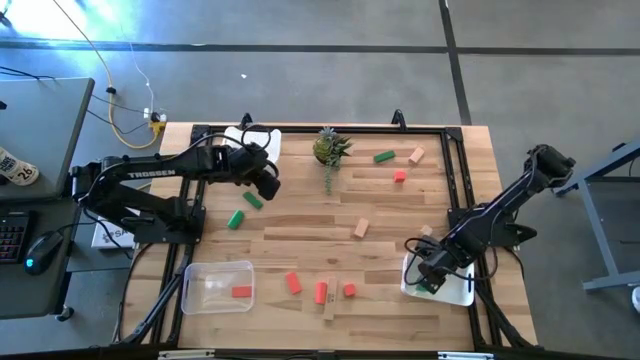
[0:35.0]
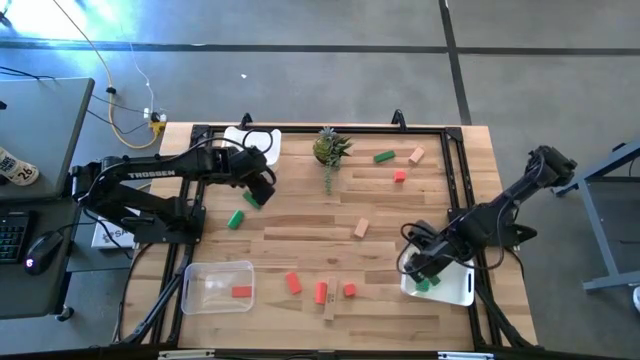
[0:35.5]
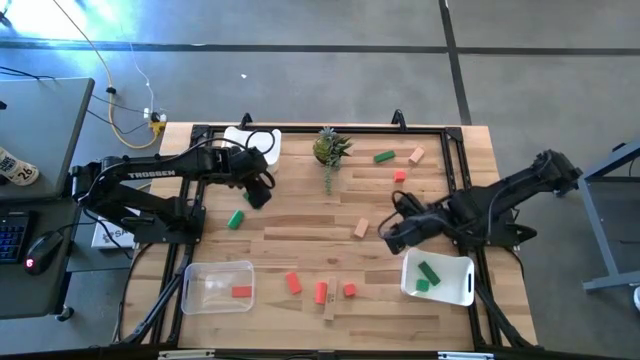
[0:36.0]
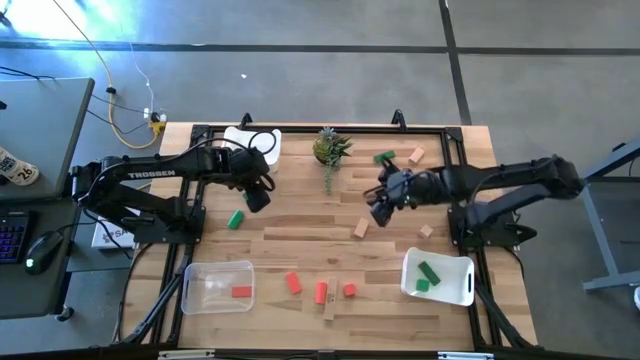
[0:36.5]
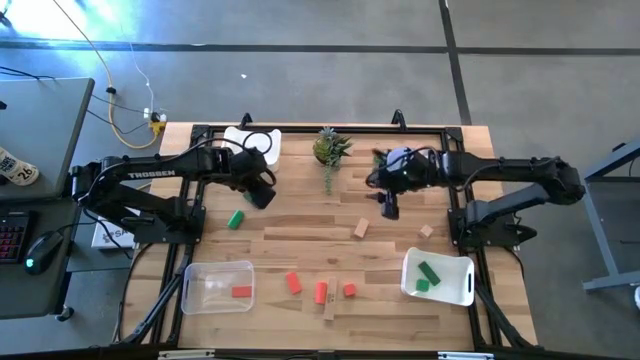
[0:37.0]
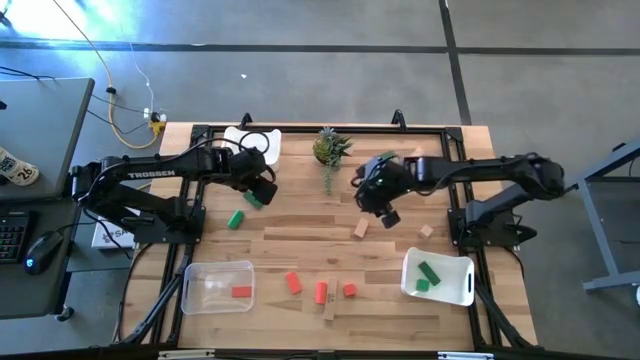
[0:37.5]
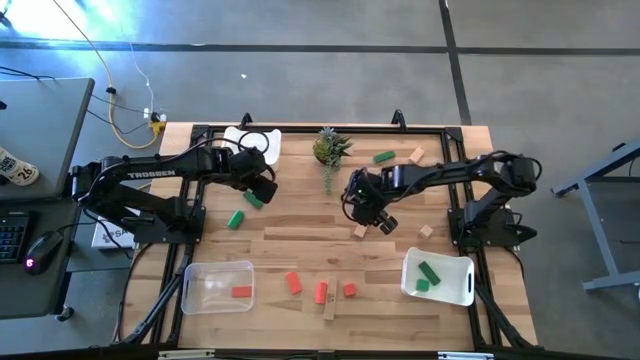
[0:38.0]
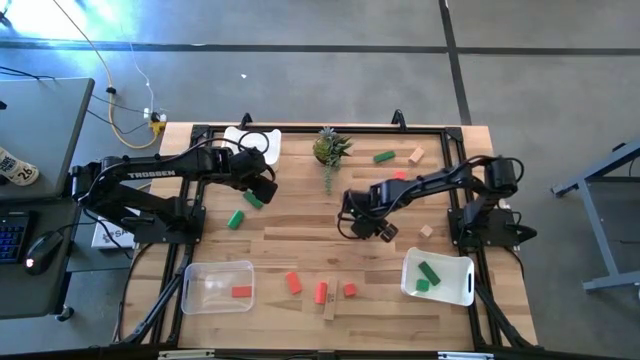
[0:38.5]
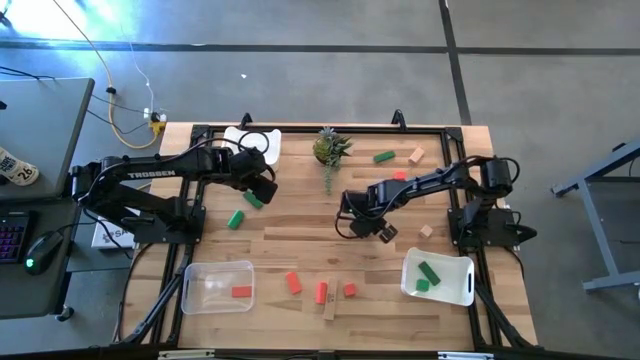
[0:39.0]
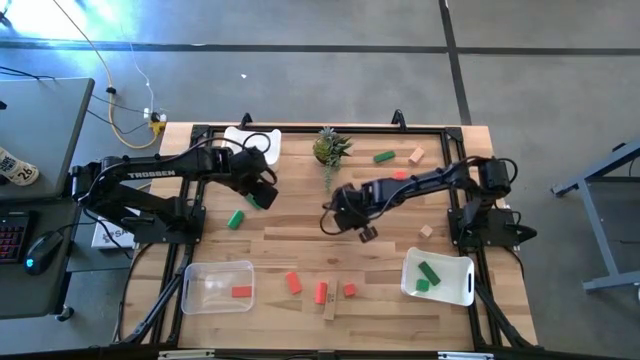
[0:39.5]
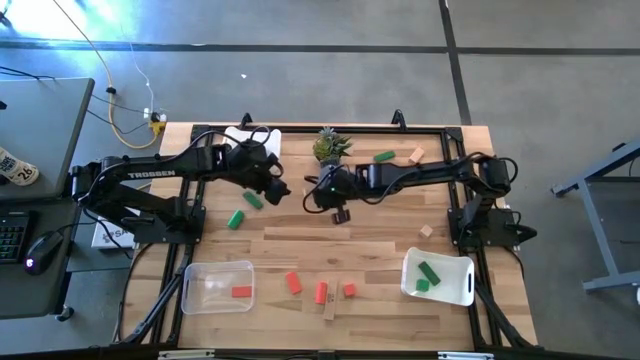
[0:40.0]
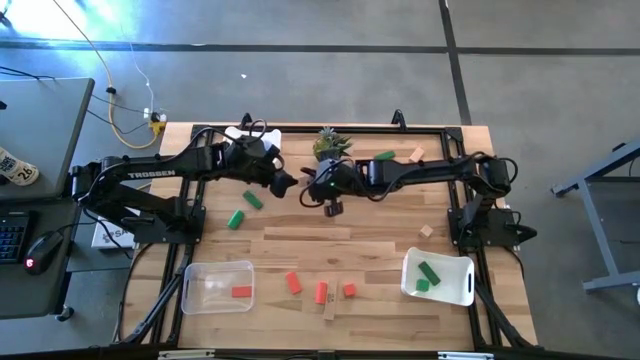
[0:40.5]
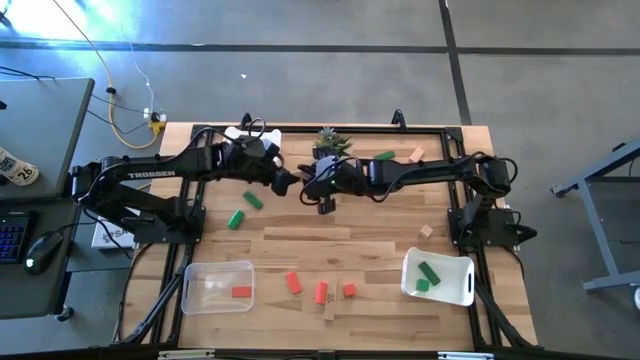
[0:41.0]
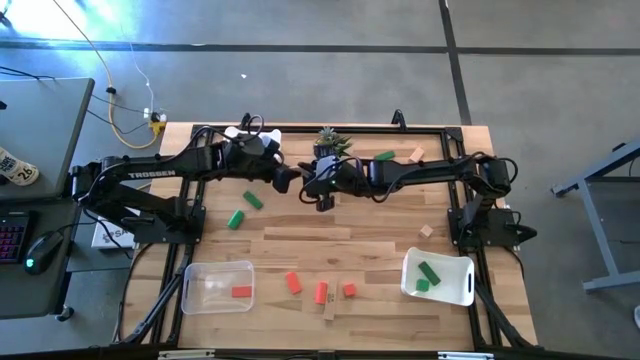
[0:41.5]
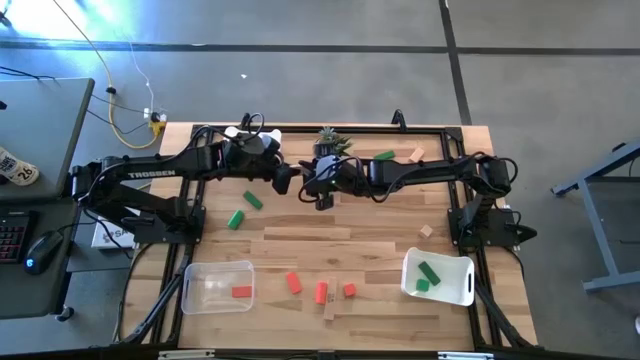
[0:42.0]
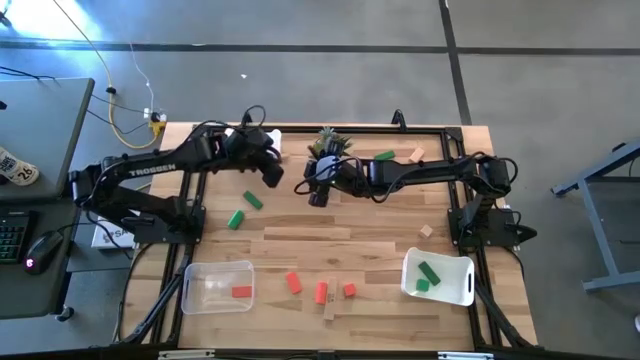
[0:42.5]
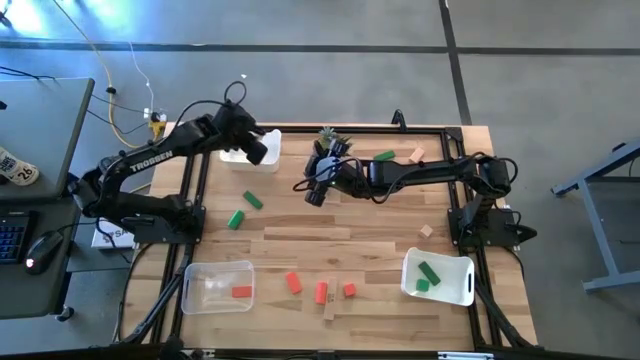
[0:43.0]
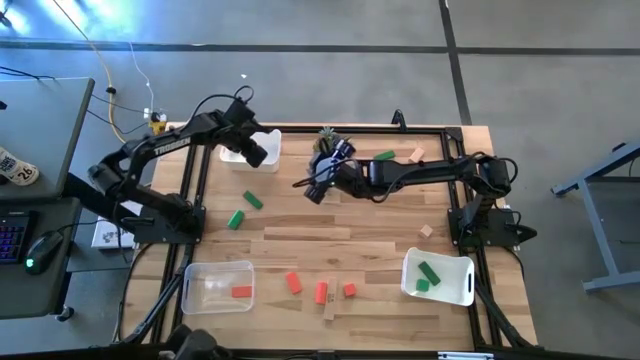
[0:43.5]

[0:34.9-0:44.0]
Task: Sort & place blocks by color
Put the brown block into the top white bin

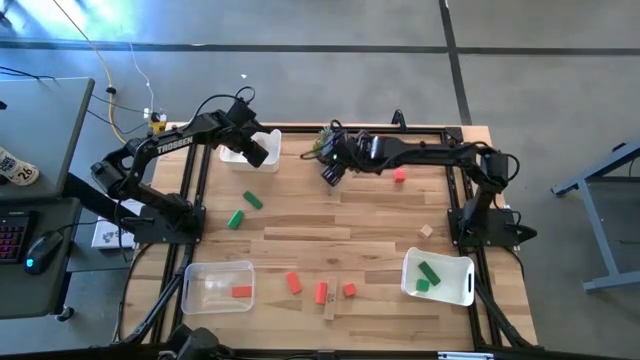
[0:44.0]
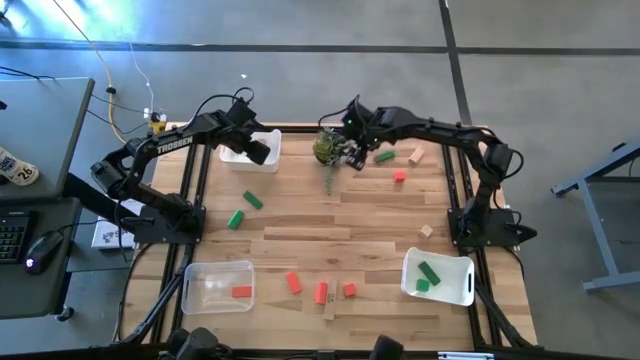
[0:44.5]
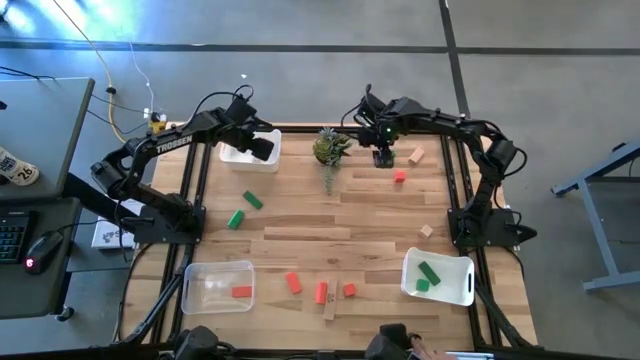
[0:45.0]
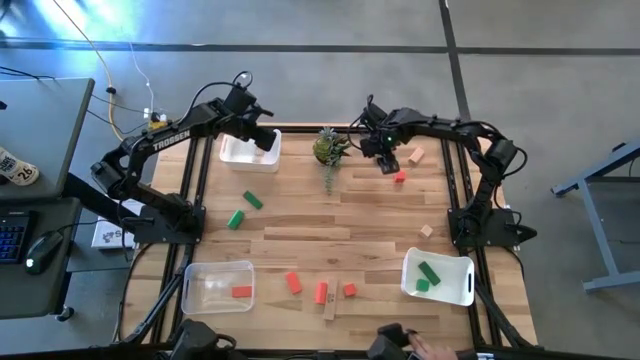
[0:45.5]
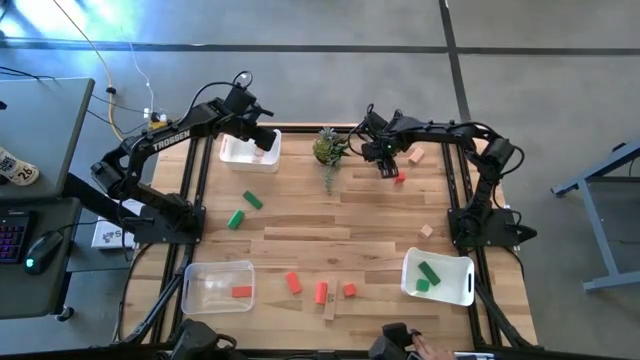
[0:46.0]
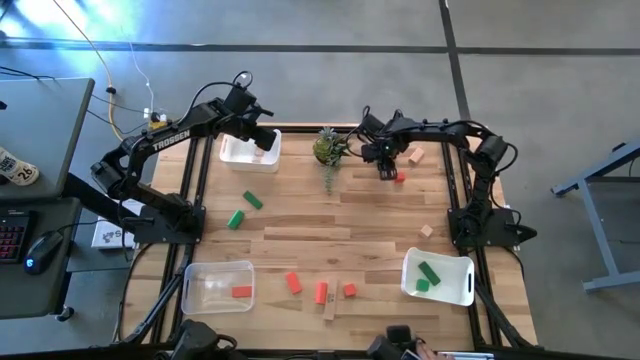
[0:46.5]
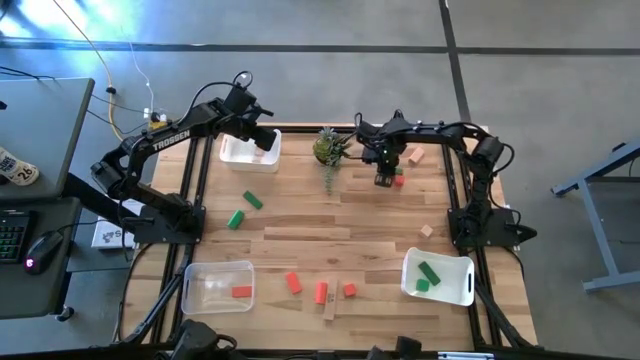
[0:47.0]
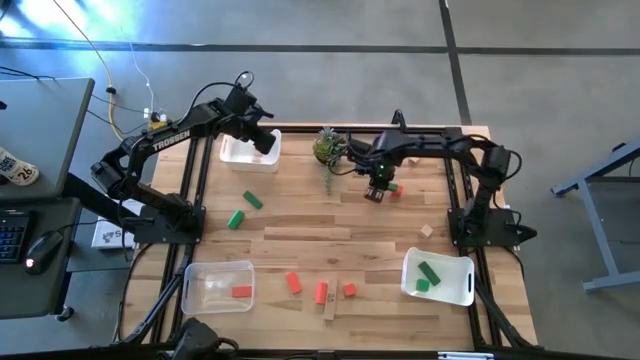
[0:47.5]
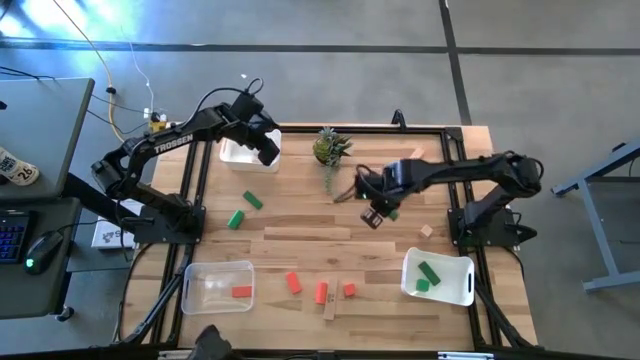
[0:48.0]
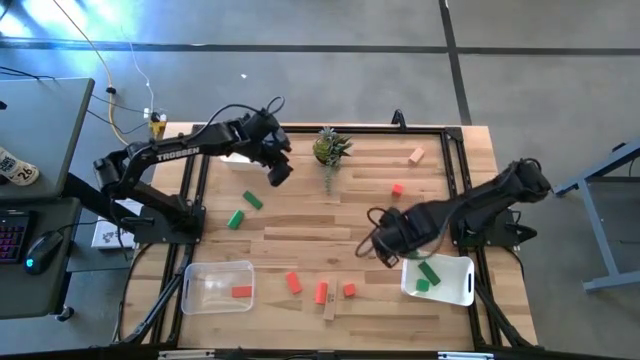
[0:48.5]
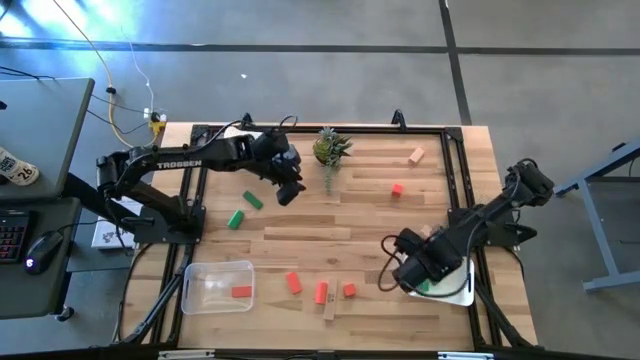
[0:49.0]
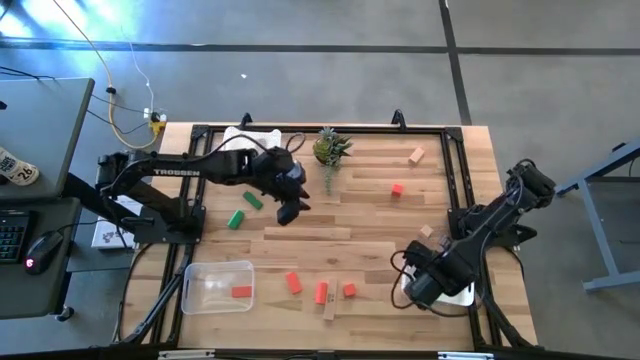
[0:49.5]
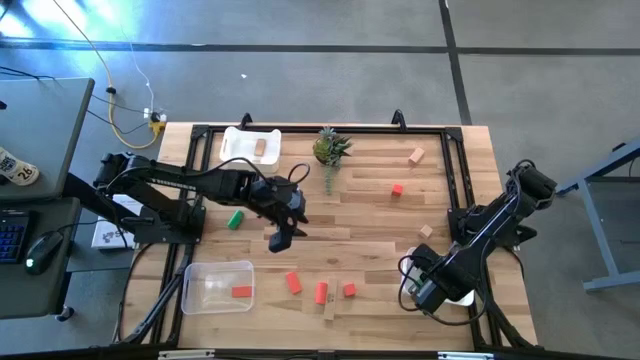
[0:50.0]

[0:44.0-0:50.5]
Put the green block into the bottom white bin

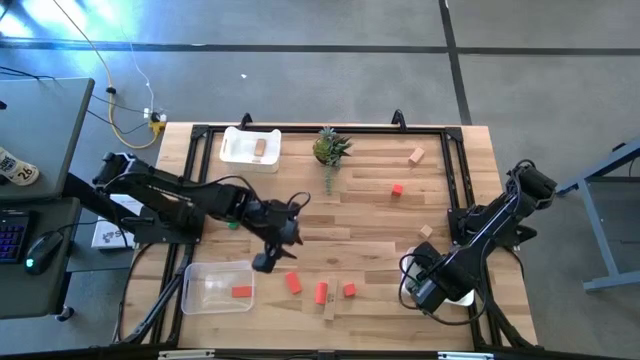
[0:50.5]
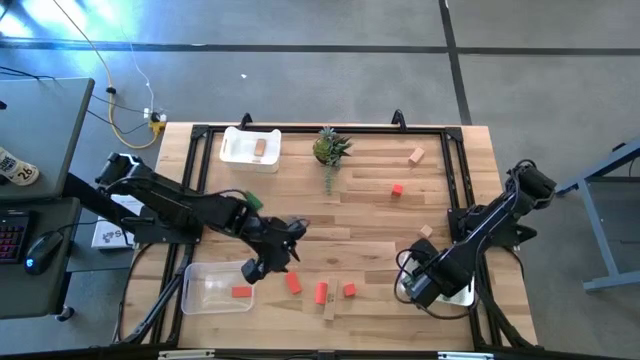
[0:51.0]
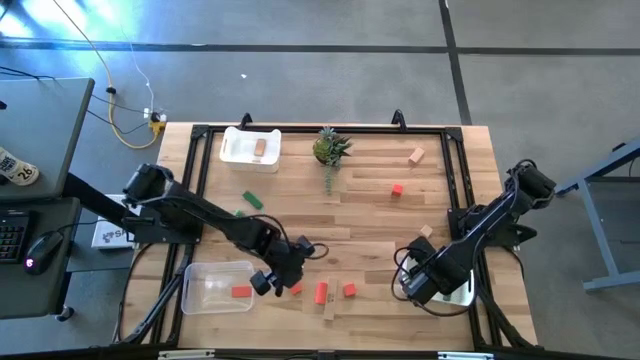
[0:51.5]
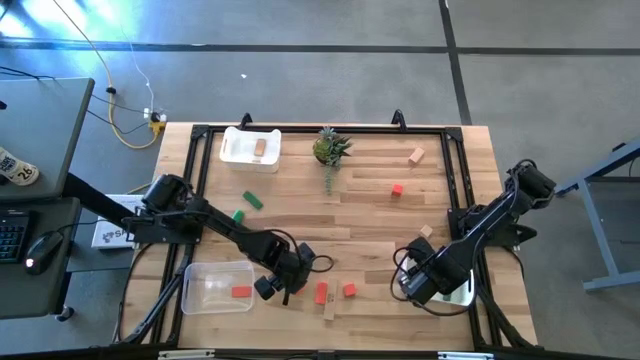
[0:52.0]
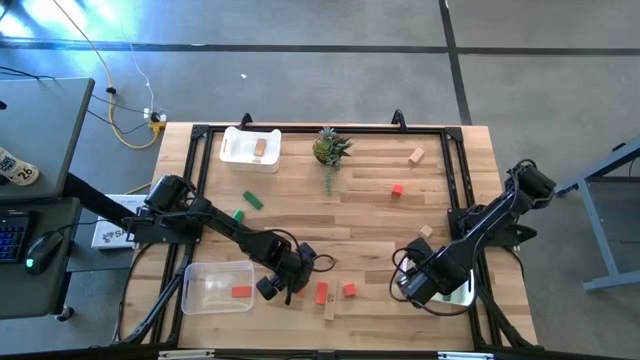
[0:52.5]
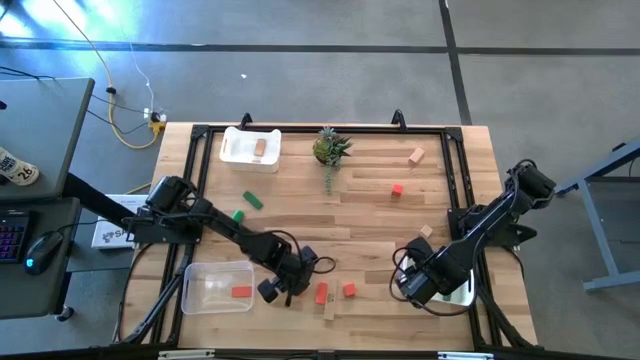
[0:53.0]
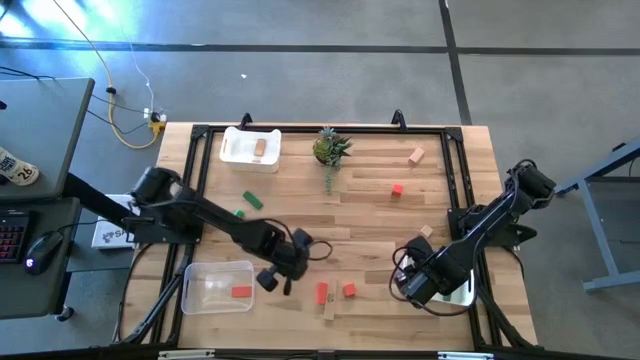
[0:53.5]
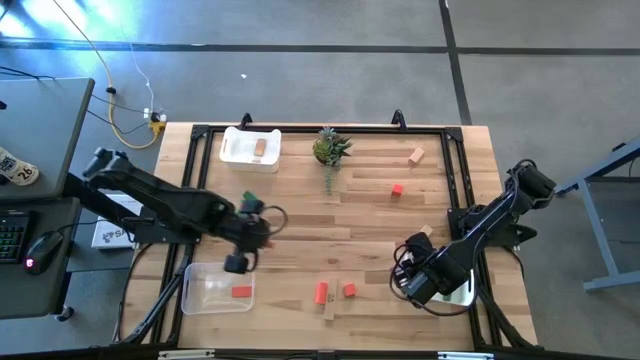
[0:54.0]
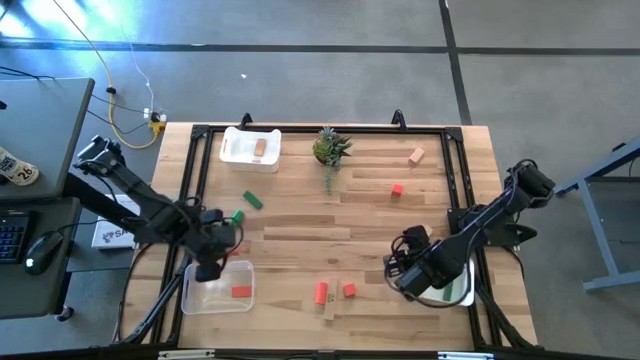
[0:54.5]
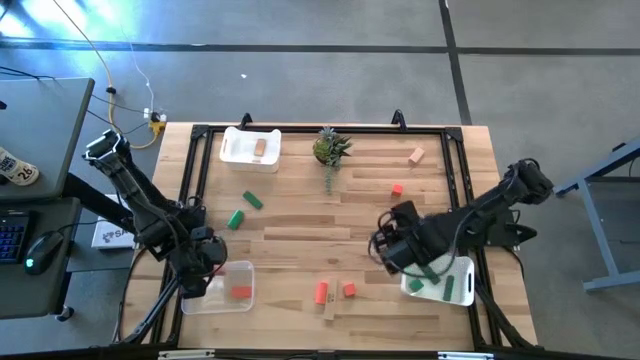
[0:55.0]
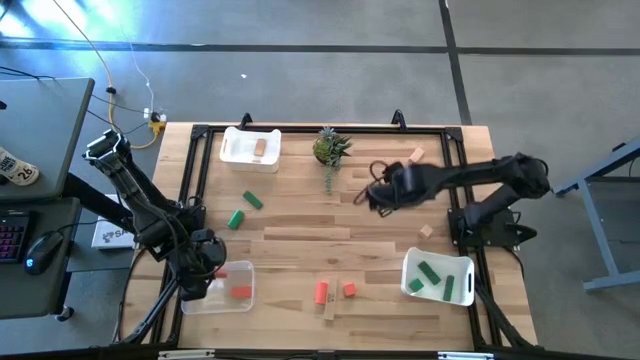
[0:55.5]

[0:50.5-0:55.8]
Put the orange block into the transparent bin
